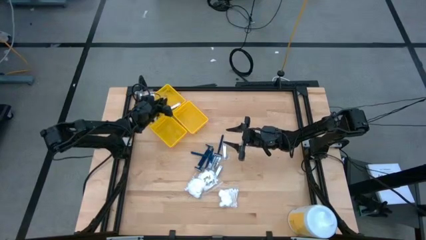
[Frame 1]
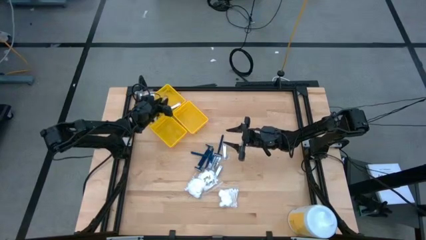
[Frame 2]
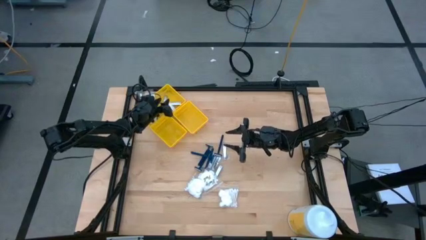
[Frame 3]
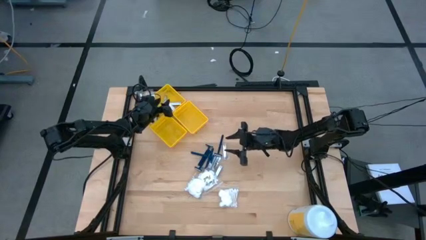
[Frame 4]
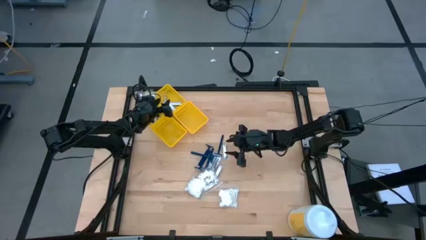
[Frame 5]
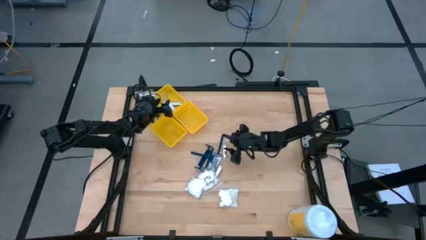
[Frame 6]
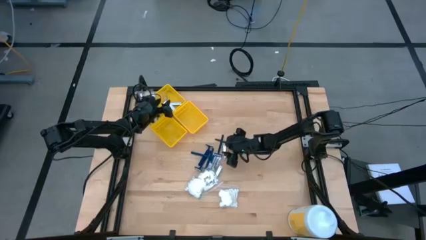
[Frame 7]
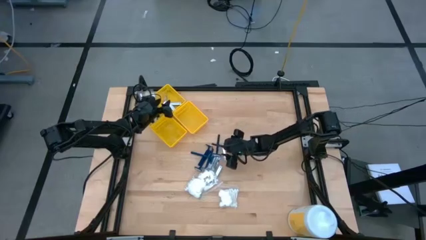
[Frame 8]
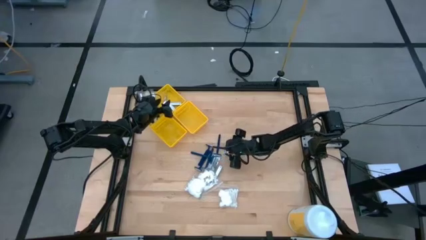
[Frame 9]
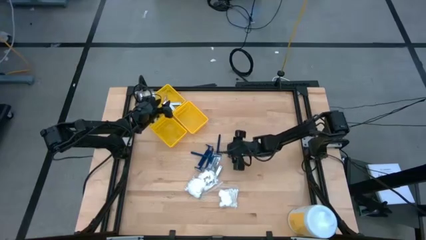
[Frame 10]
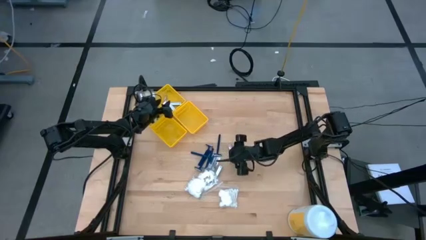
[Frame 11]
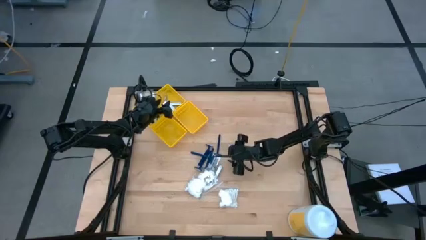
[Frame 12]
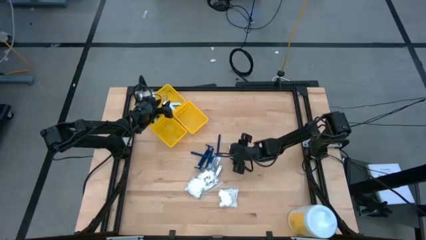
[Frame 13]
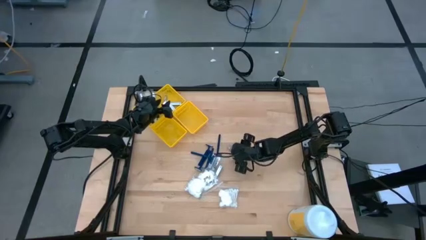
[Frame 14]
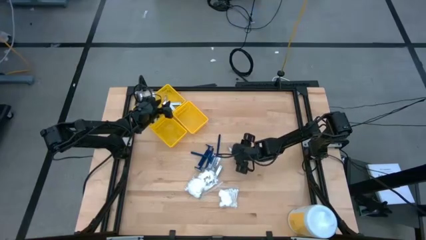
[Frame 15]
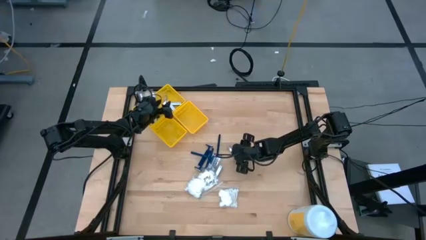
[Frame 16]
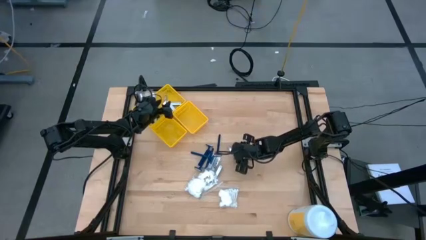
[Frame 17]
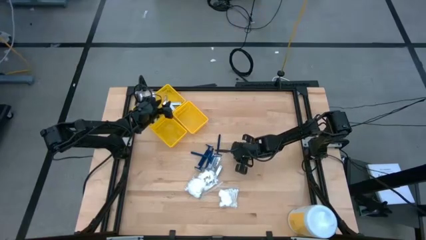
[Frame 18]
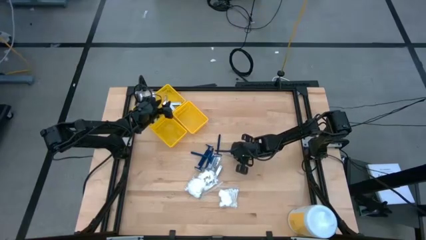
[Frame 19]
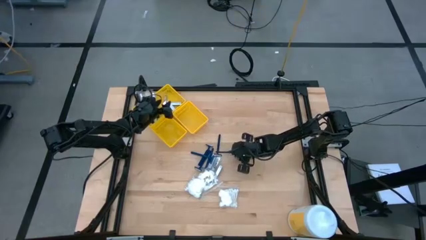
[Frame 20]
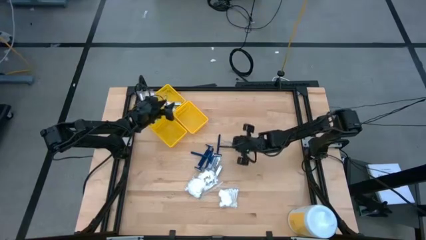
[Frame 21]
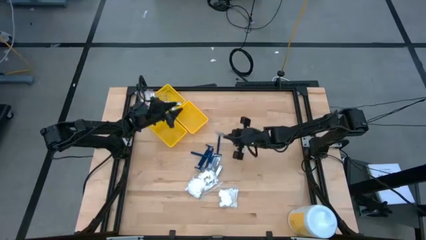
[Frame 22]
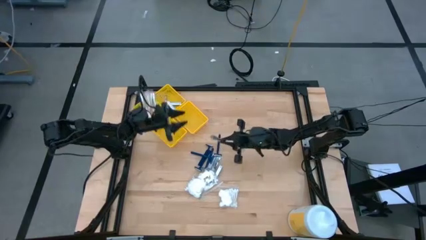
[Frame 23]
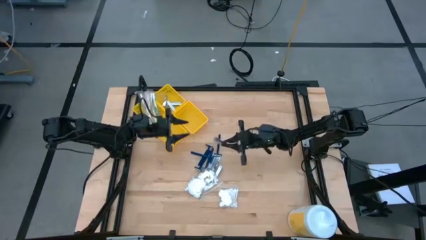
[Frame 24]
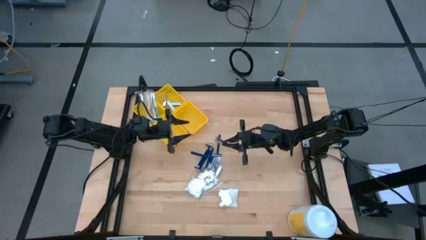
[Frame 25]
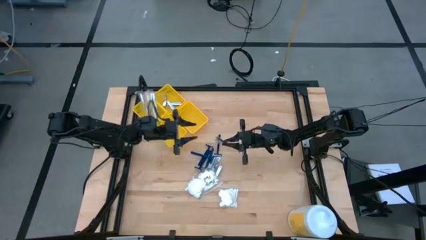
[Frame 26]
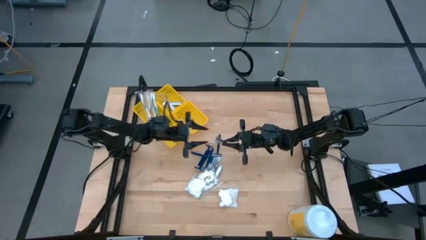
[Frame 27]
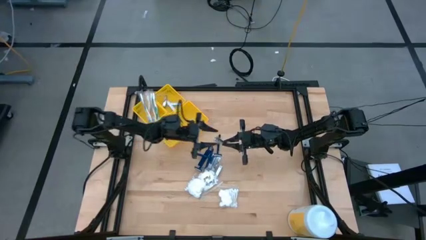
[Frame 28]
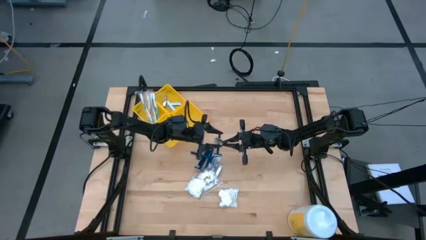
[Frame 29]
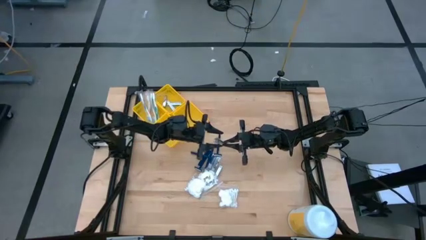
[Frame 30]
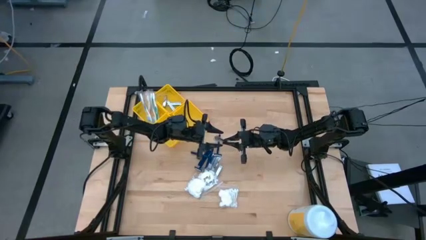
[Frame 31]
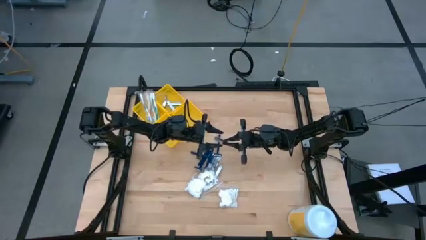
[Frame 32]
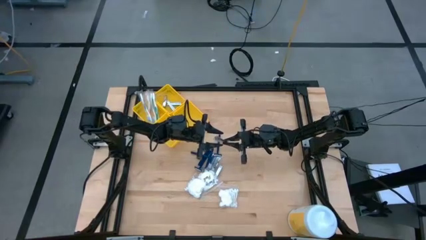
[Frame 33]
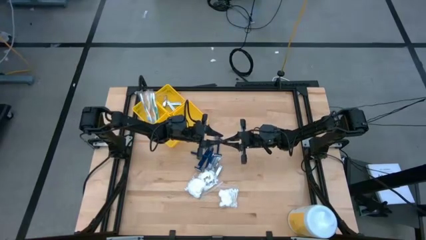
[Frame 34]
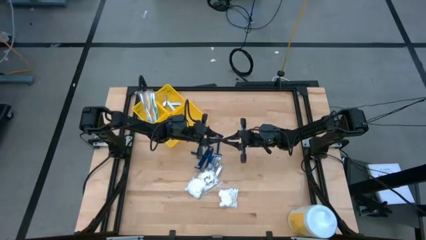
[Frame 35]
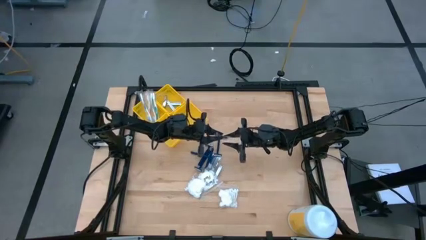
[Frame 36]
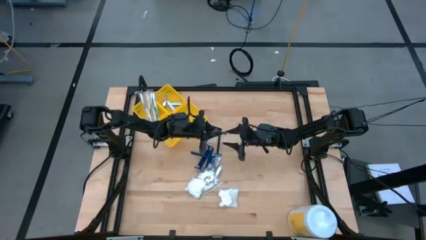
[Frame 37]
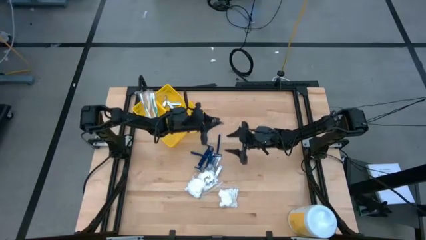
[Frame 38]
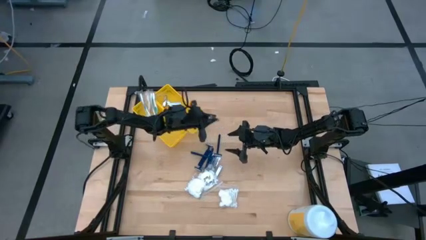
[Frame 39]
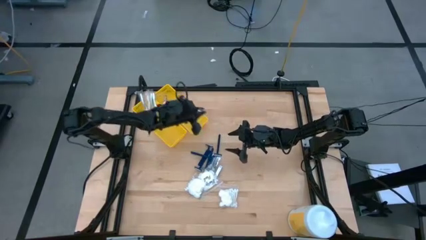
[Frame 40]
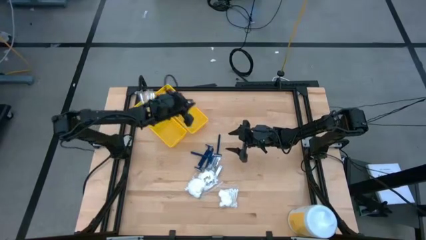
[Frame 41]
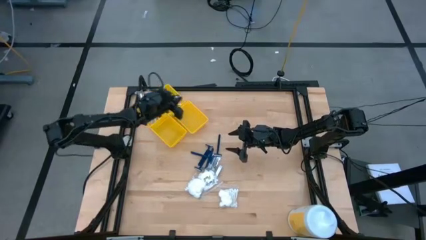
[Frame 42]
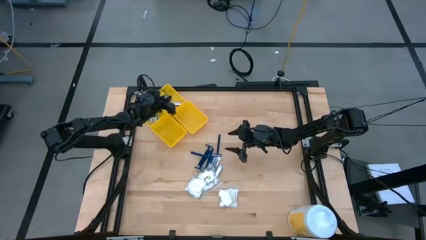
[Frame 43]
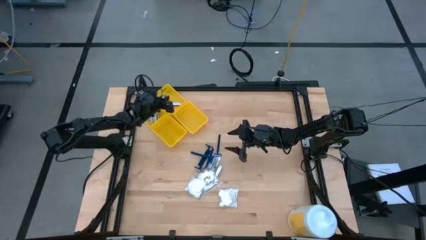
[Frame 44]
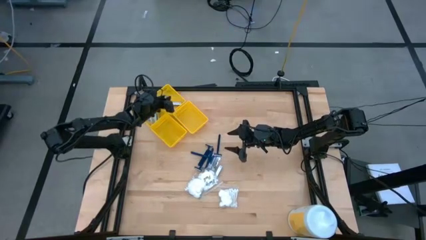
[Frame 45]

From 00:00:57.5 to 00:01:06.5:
Task: Pick & Place Travel size toiletries
Put the silver nail cutter into the top yellow bin

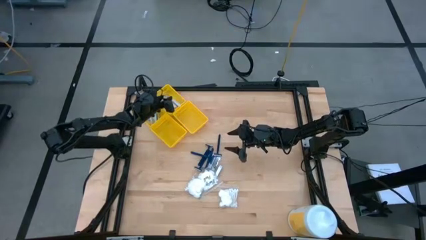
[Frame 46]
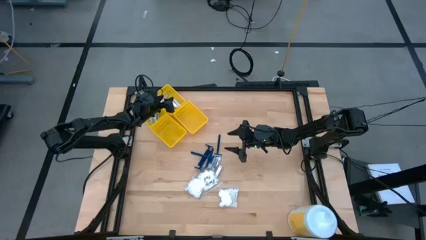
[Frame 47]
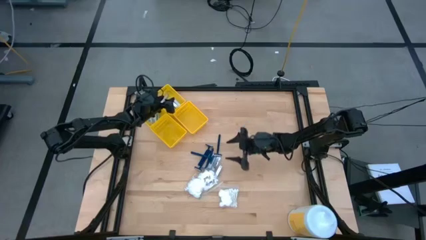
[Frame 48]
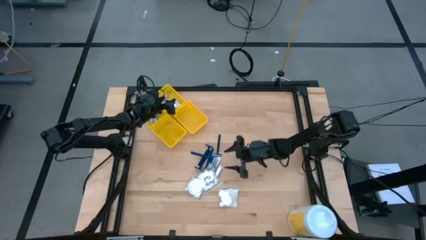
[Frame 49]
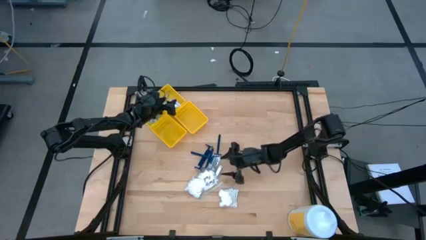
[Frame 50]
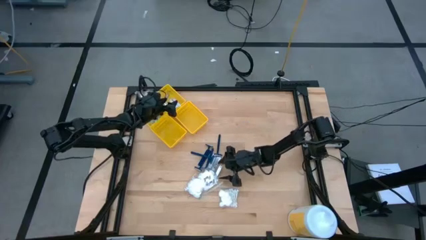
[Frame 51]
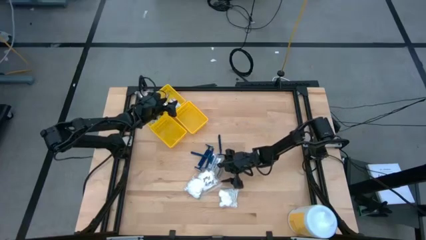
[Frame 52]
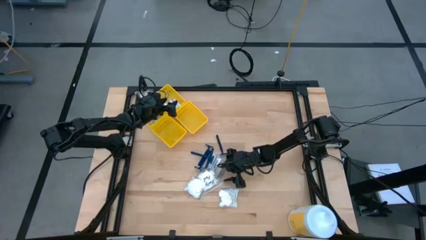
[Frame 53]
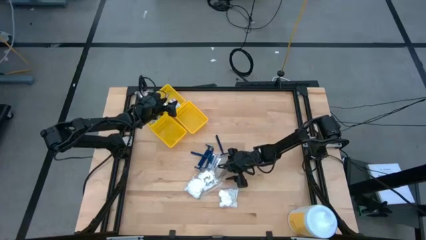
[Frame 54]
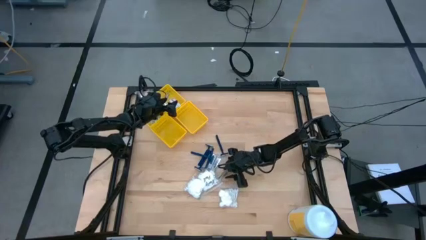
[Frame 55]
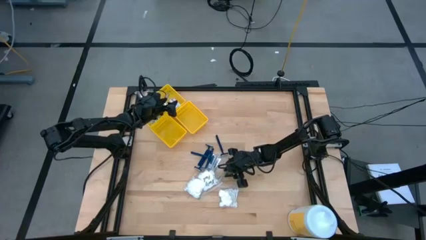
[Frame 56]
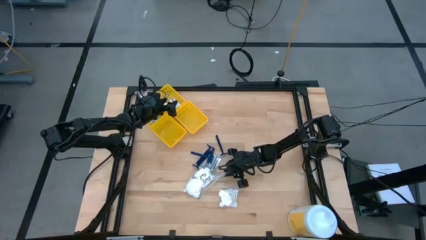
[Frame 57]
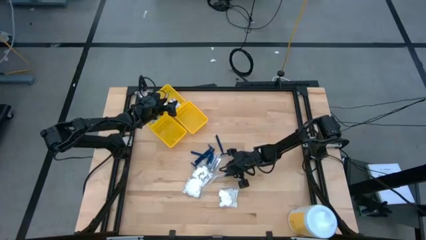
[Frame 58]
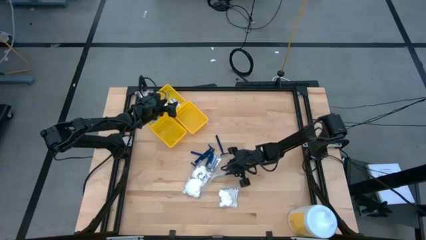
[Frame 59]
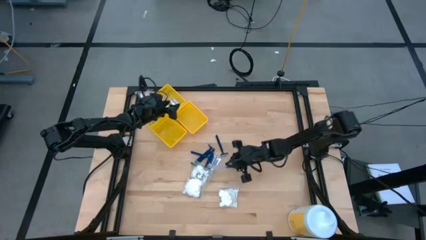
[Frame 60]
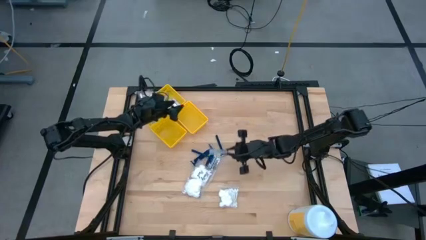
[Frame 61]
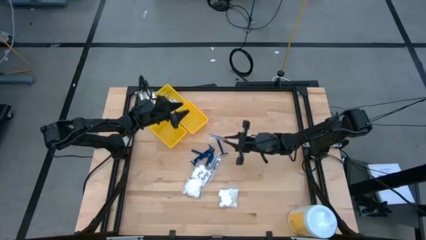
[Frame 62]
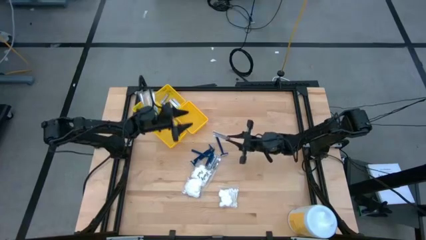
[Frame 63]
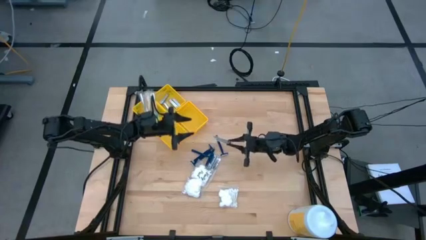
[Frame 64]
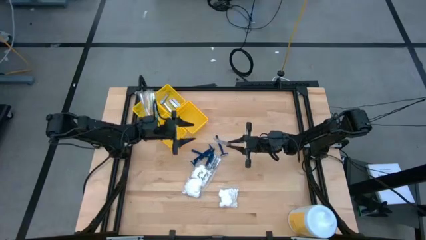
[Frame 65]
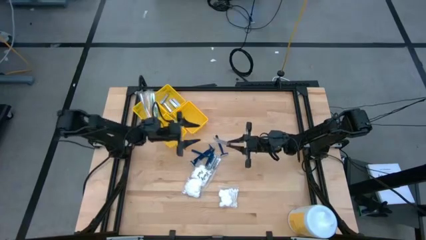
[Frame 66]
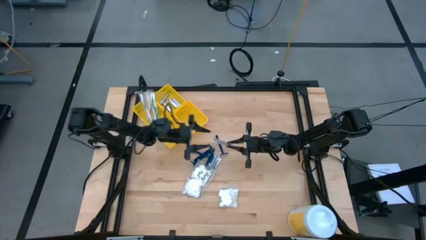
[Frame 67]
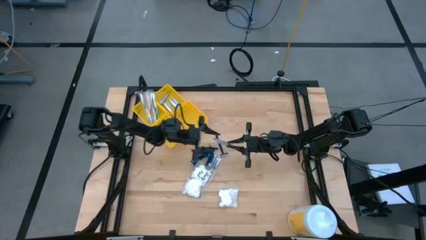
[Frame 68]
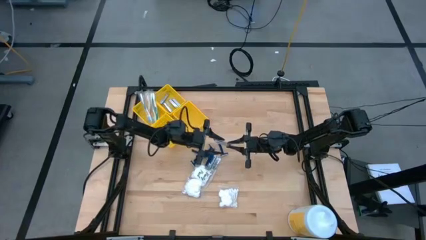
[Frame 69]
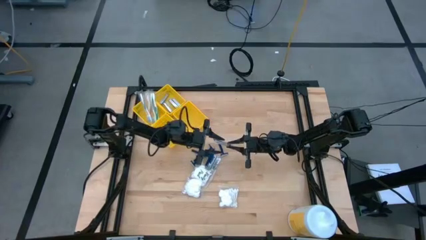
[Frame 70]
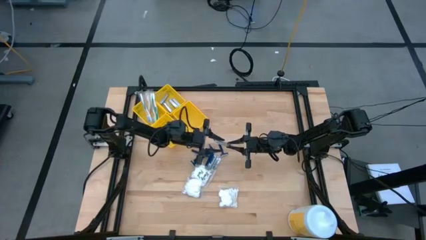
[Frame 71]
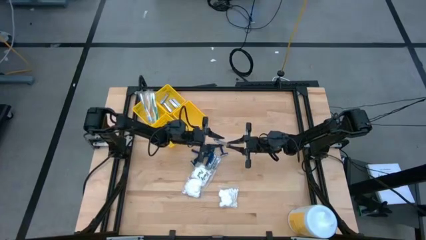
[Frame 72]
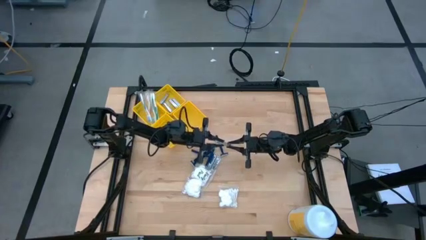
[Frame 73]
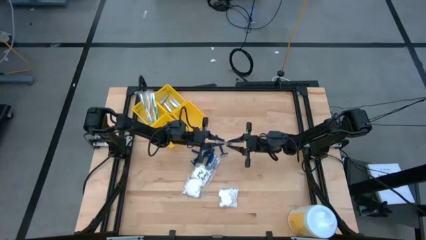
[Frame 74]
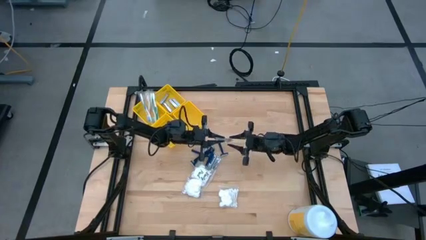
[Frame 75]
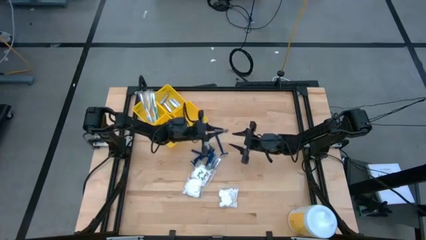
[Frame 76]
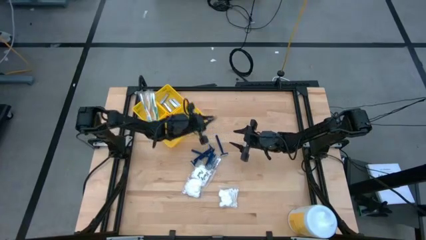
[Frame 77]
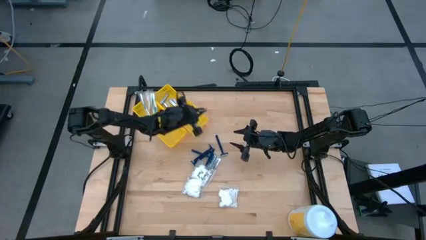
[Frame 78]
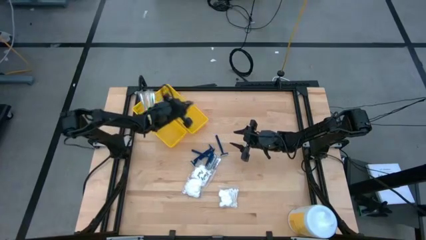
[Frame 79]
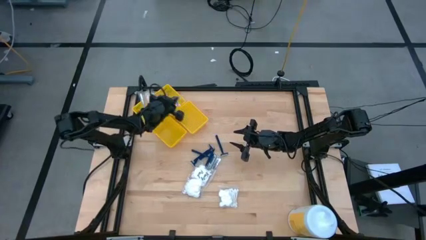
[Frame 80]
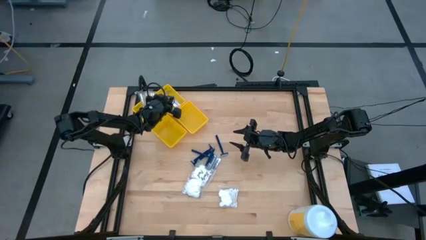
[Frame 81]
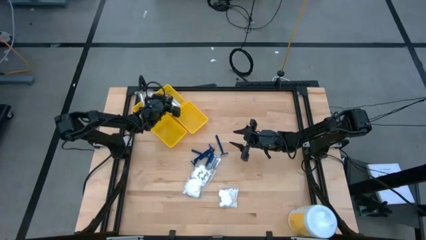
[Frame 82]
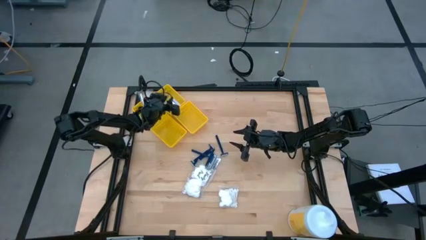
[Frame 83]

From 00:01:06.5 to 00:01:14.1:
Put the silver nail cutter into the top yellow bin
